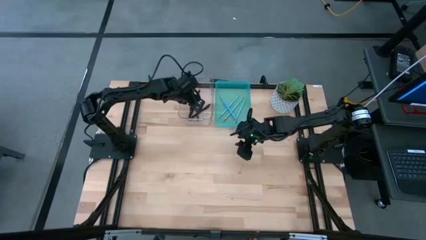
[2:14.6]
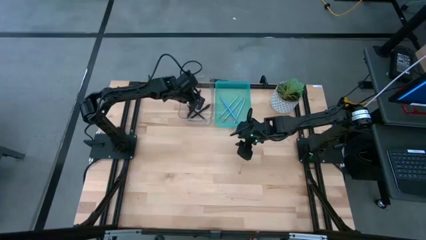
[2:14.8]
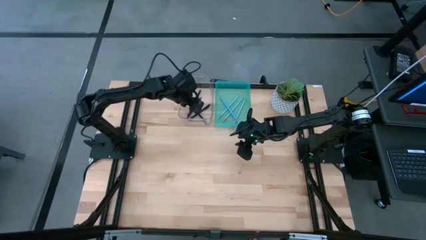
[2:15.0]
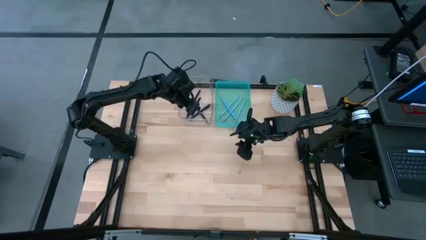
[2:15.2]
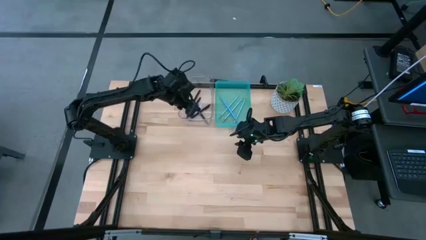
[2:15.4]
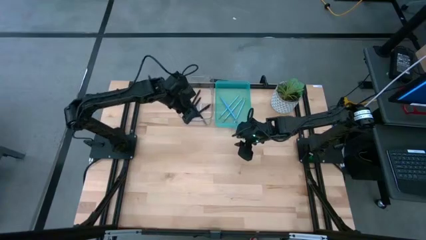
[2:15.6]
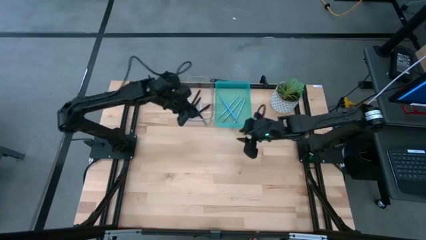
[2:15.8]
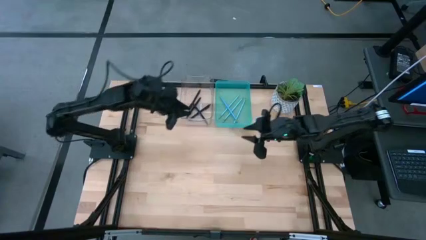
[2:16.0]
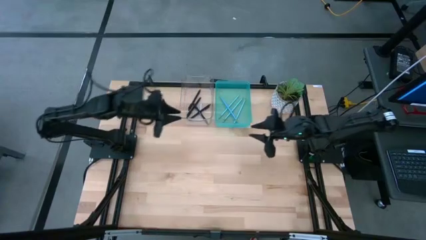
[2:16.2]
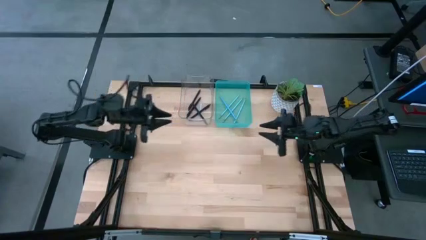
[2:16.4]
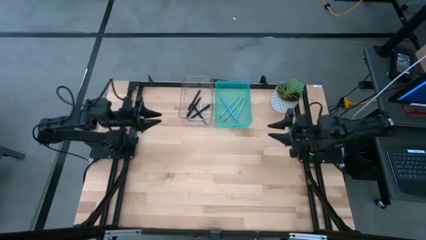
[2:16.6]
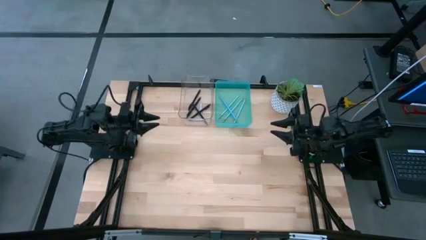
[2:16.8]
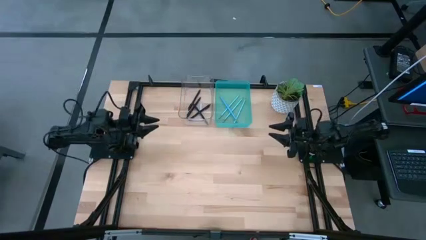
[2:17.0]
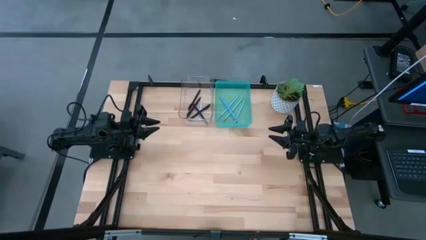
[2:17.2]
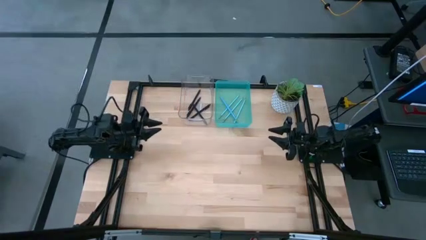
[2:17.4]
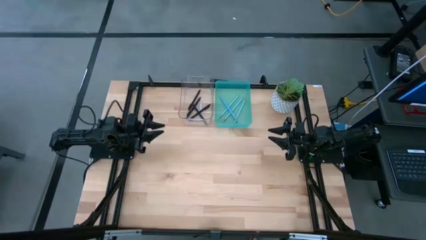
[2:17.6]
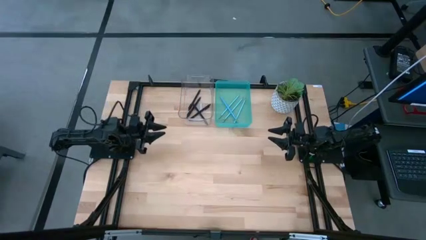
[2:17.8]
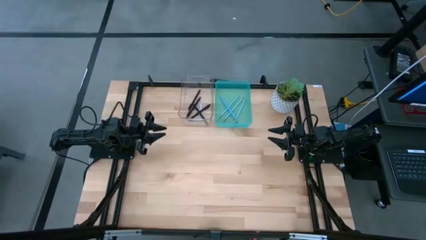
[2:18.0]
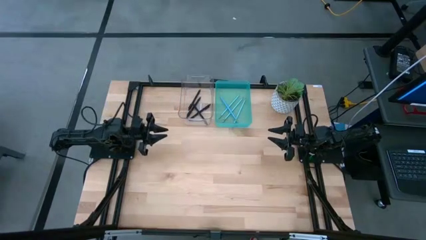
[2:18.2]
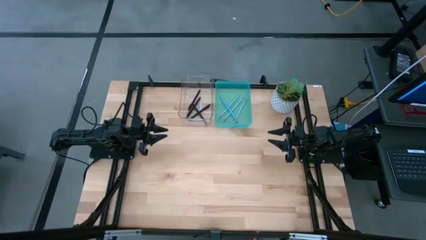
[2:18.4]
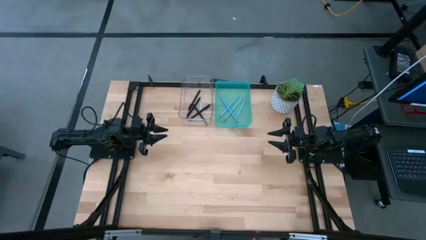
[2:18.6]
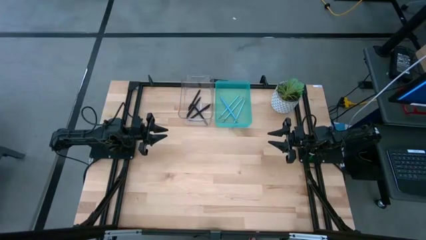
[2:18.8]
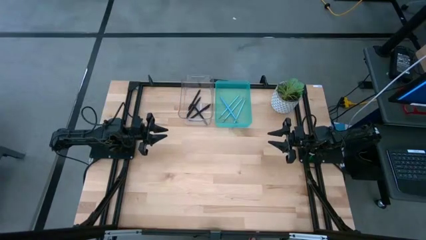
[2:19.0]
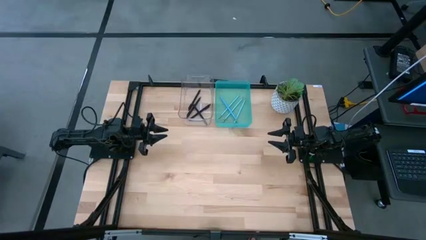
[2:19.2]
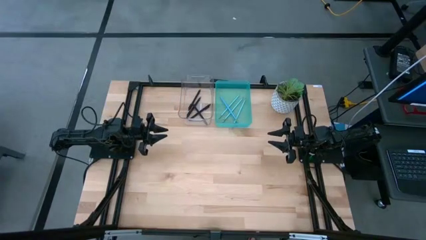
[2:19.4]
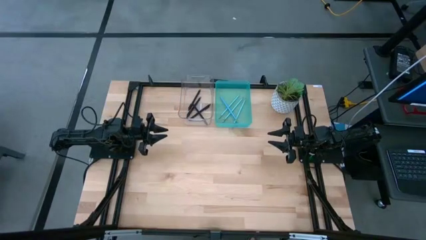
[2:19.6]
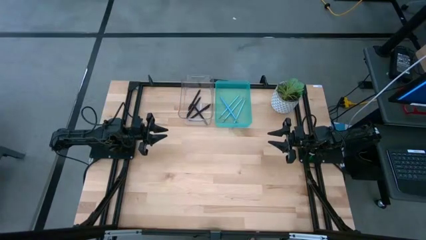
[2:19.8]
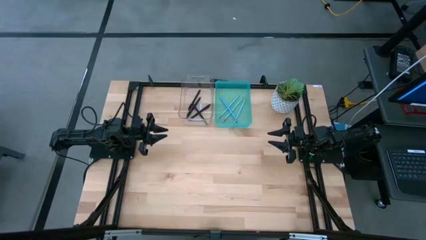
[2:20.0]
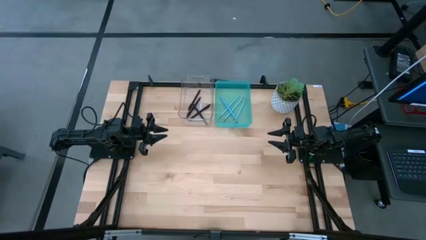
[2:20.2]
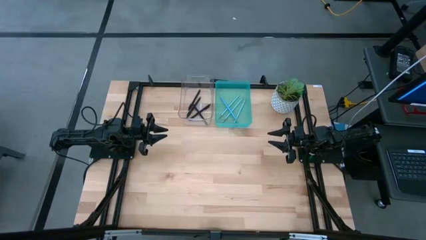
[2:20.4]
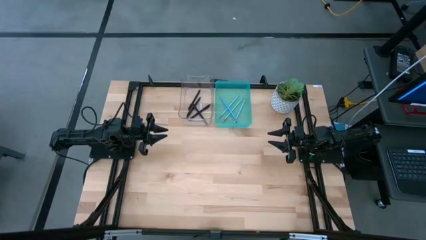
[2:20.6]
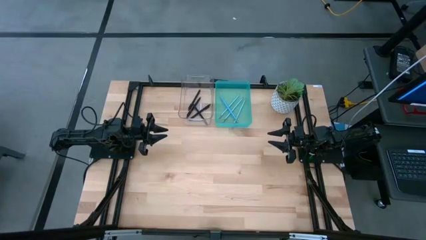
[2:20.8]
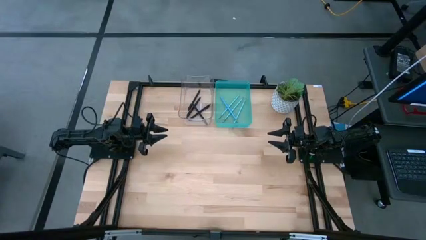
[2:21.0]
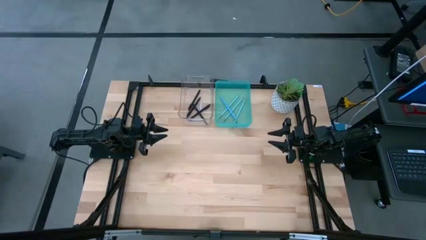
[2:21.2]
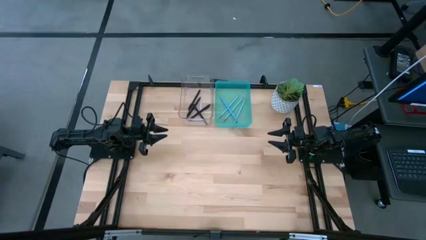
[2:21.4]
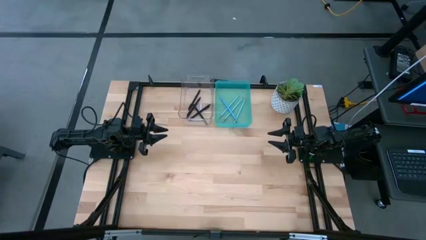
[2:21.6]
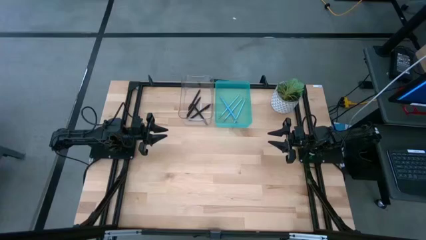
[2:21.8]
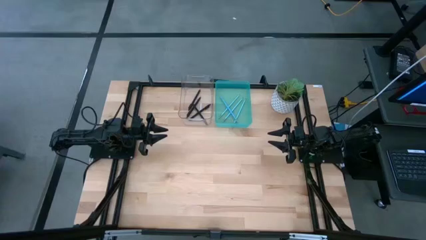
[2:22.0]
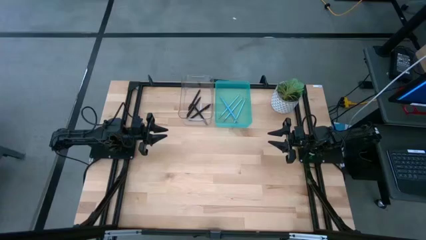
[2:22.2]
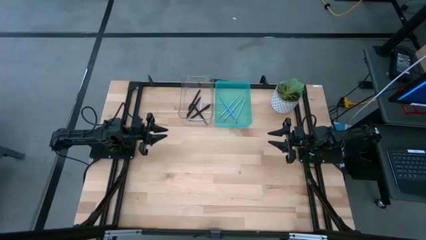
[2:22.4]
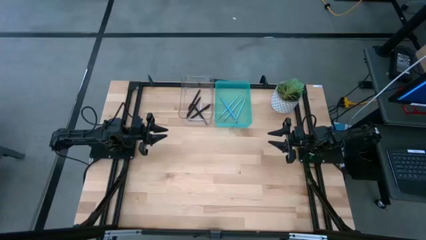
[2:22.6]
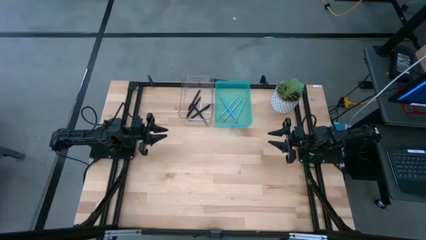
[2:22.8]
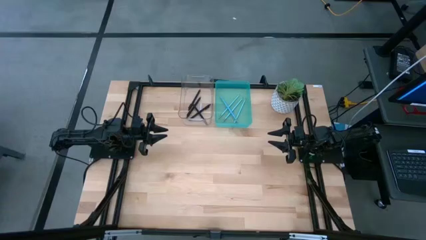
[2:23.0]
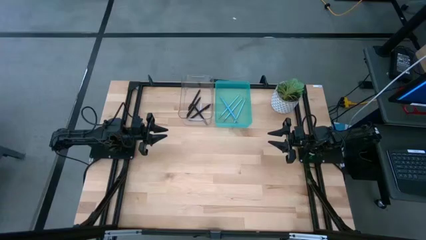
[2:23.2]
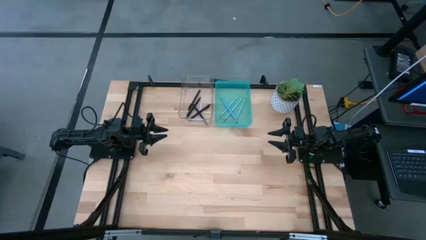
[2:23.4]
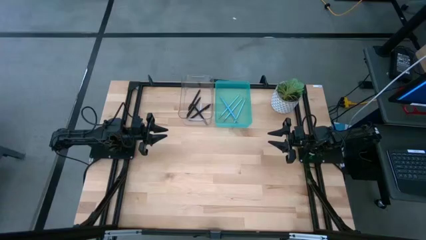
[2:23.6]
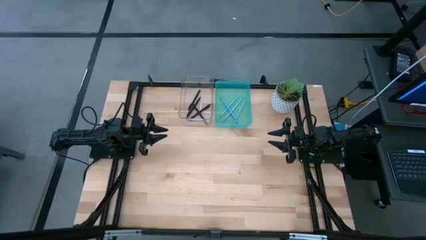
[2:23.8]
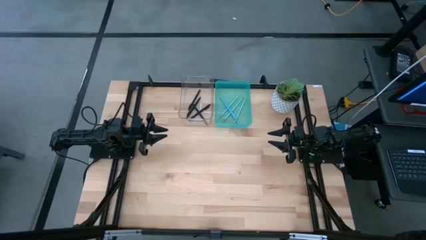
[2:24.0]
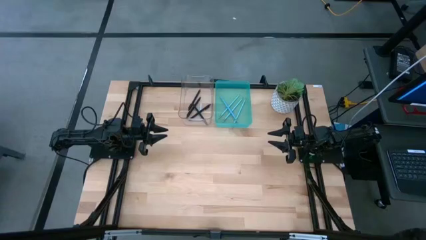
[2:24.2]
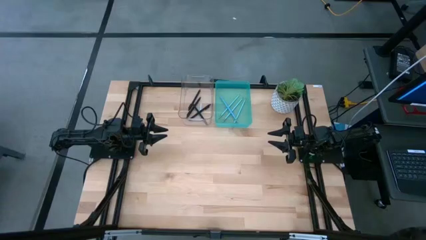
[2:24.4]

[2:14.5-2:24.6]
Task: Sort pens & pencils
Return to Home Position

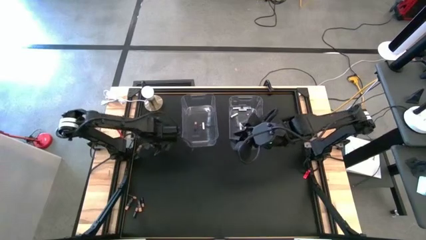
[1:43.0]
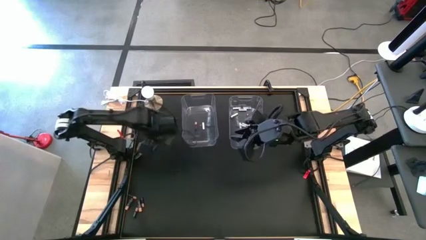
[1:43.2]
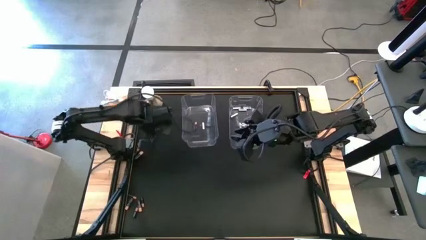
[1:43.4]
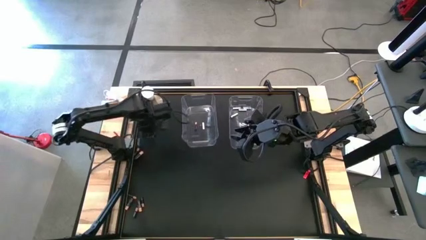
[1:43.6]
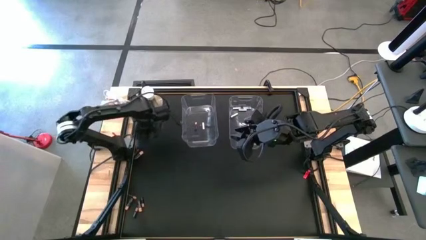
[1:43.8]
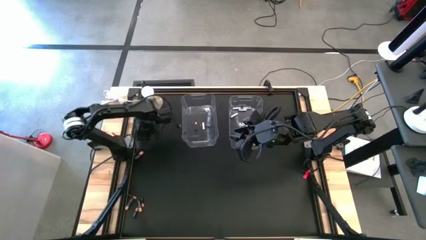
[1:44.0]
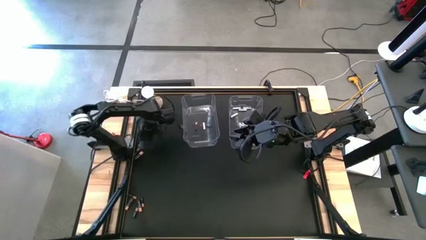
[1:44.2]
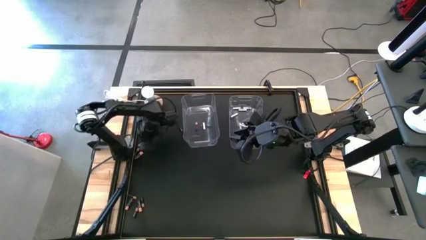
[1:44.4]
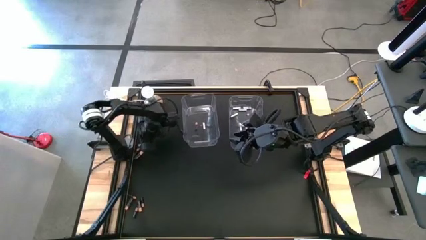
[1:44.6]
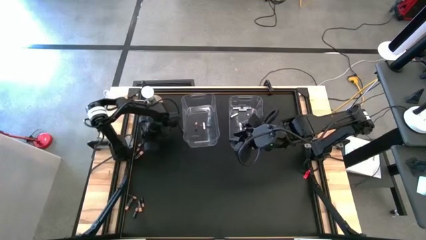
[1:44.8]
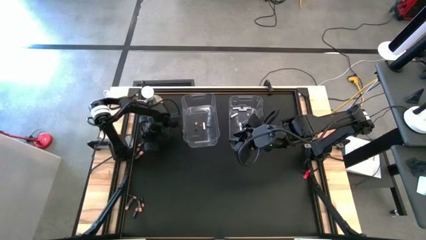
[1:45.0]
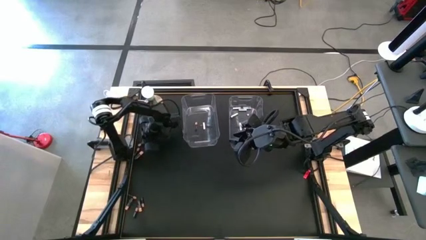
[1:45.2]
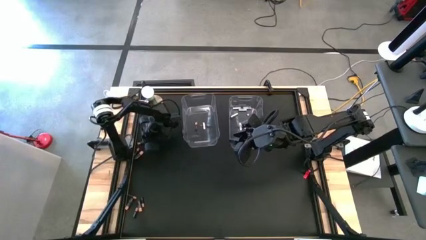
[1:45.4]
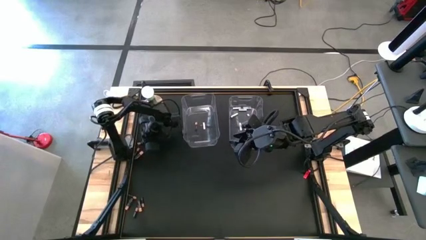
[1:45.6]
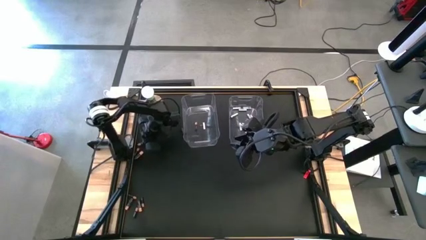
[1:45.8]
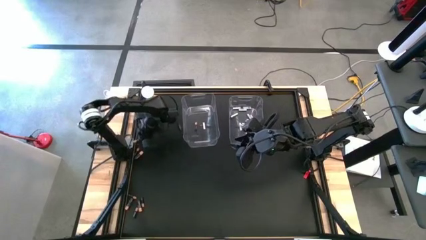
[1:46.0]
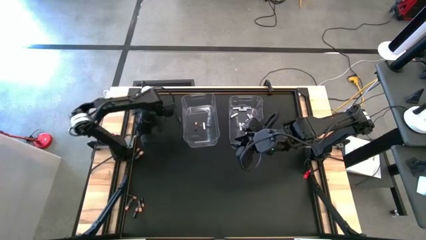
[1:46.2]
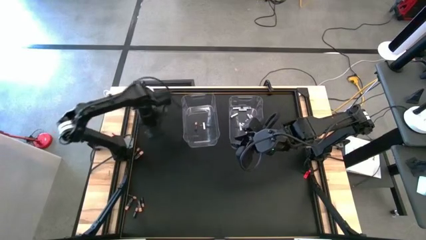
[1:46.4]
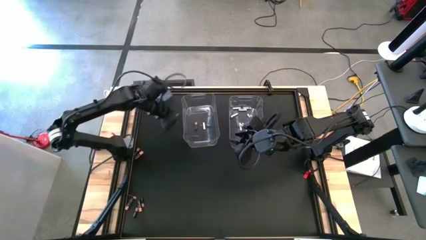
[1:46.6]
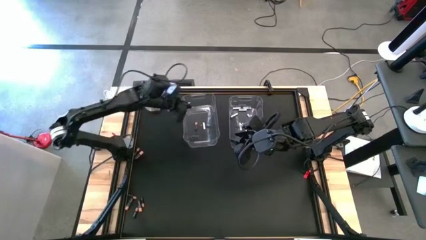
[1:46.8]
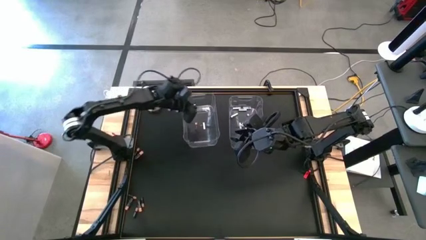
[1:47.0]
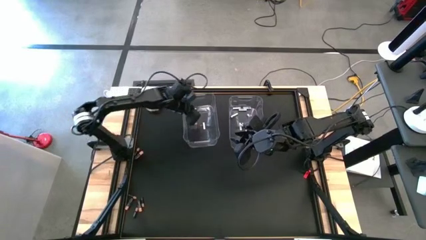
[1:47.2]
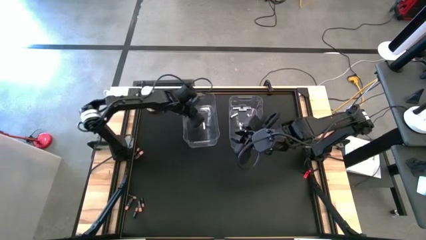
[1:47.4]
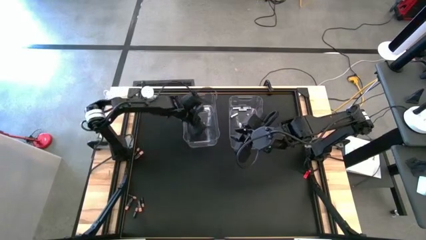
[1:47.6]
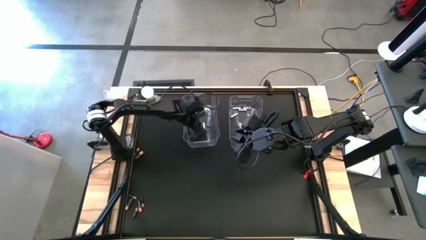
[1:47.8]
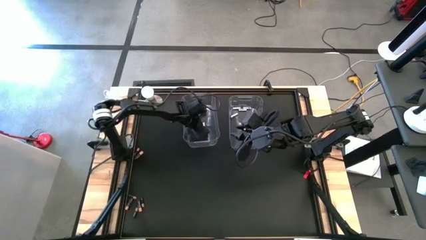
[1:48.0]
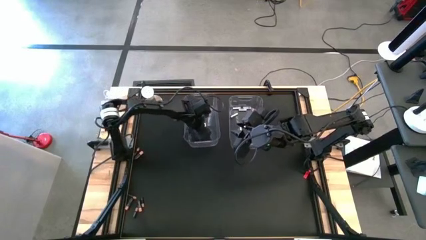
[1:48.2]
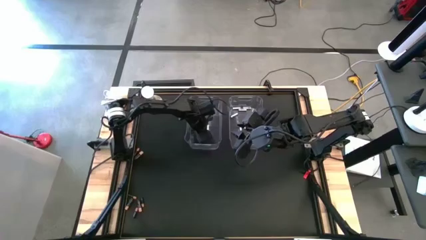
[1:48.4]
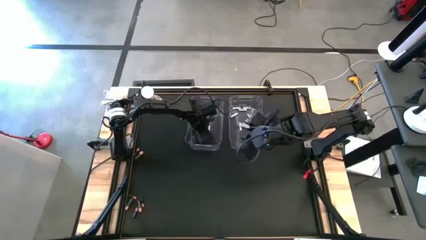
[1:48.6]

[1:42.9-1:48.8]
Task: Sort batteries
Put the black battery into the left transparent bin

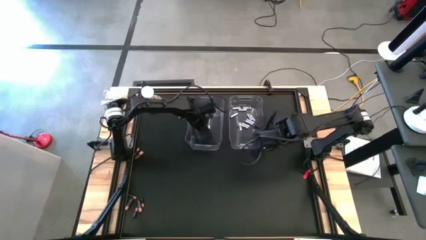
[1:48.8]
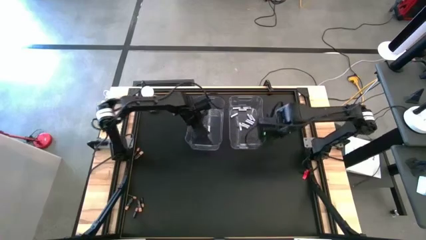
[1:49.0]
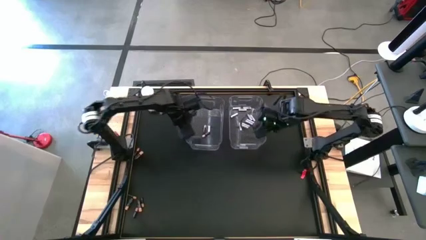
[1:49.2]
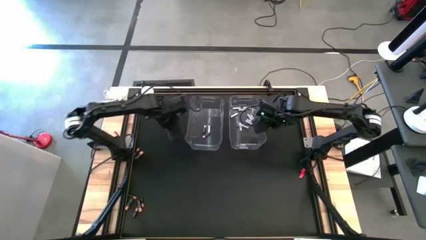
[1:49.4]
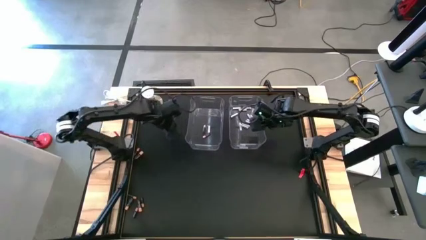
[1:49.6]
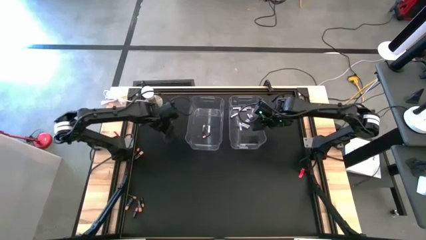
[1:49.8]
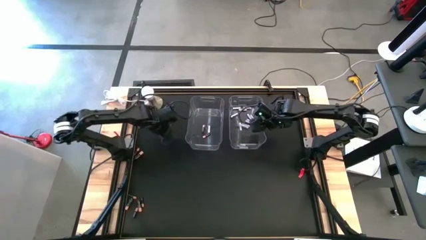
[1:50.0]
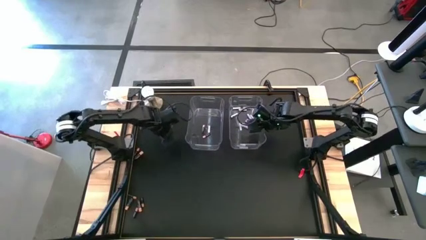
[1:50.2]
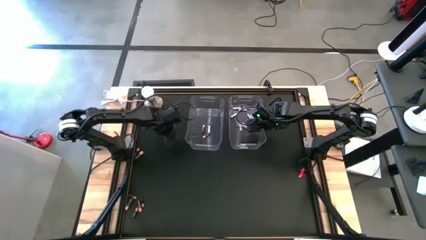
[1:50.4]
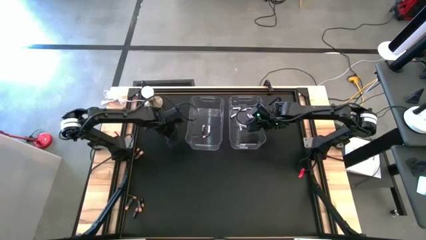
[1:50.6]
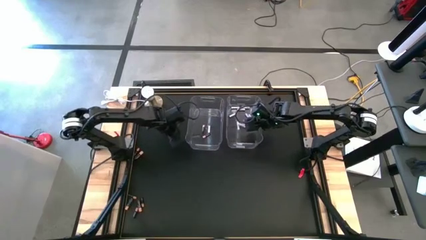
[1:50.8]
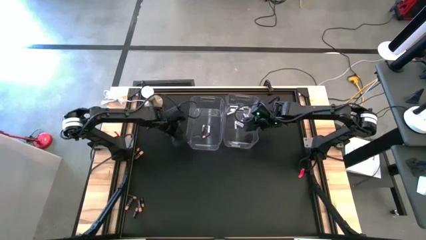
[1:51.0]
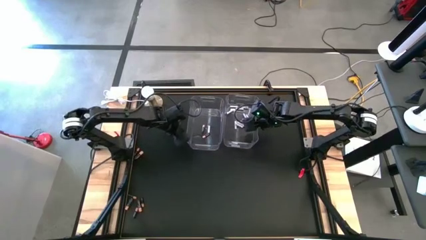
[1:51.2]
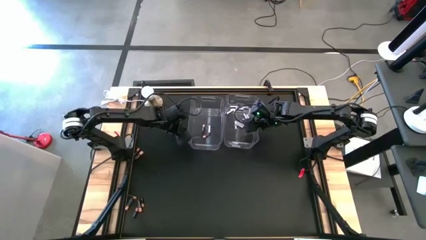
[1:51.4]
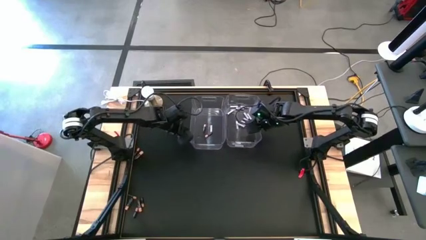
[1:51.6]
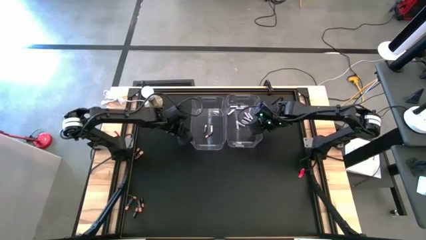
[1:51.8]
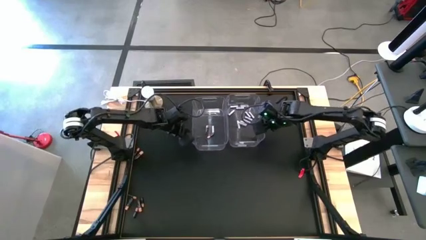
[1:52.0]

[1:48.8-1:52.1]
Adjust the transparent bins closer together
